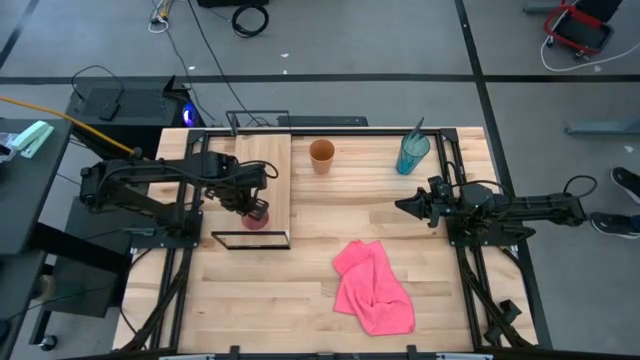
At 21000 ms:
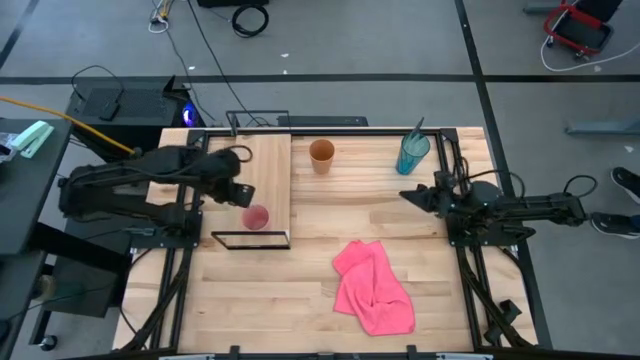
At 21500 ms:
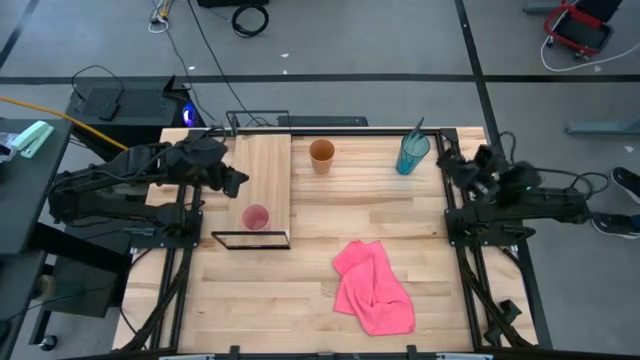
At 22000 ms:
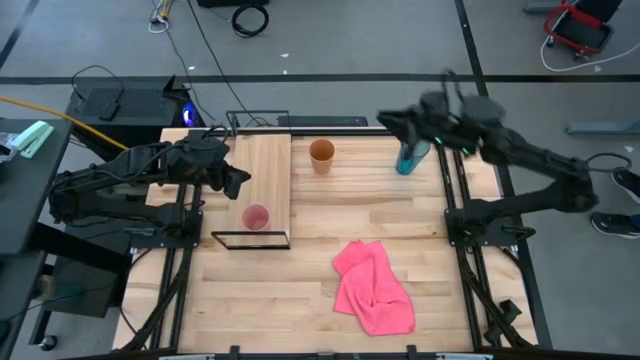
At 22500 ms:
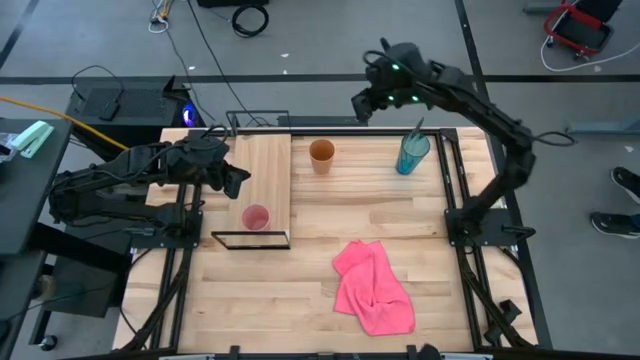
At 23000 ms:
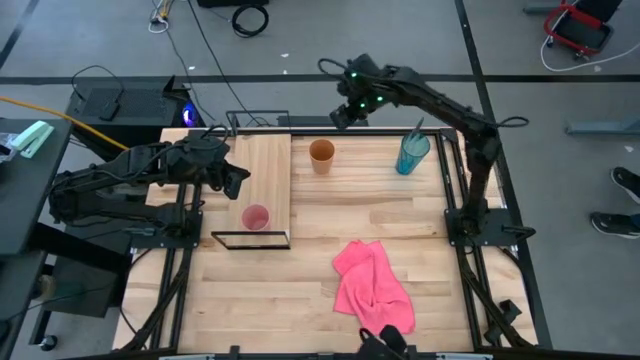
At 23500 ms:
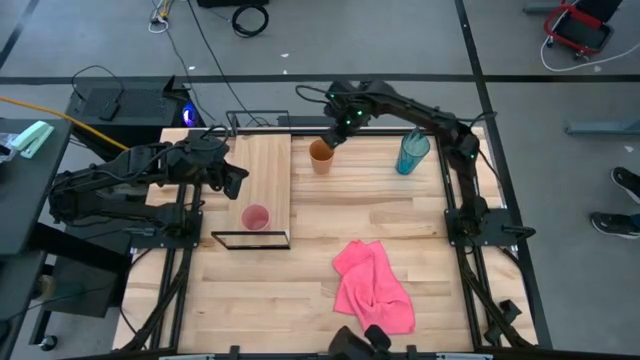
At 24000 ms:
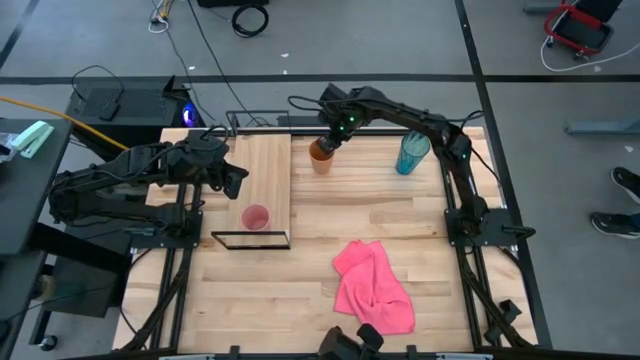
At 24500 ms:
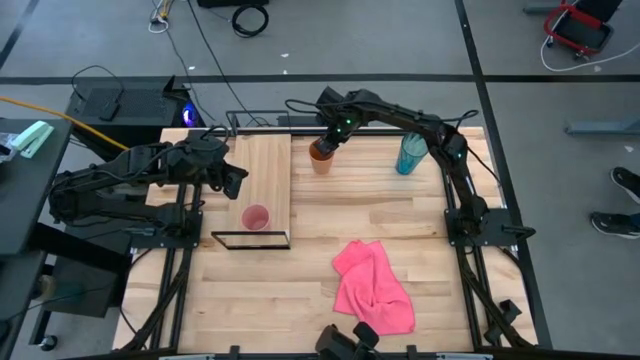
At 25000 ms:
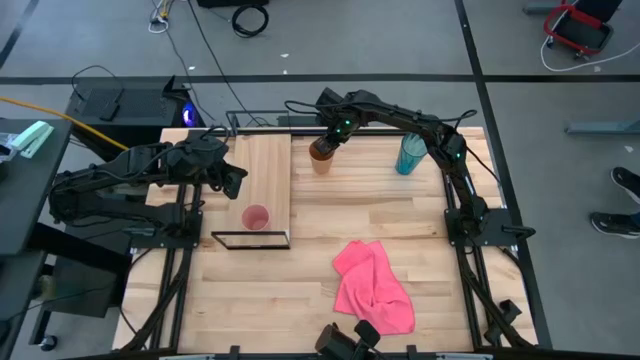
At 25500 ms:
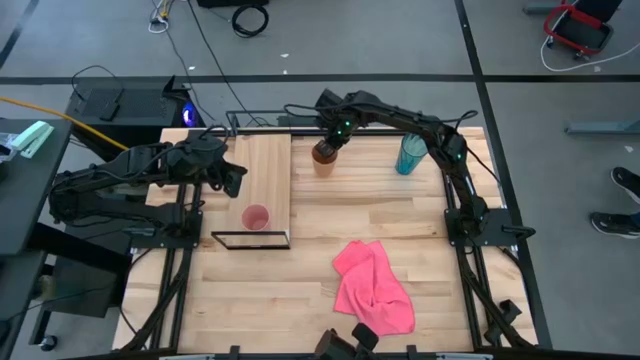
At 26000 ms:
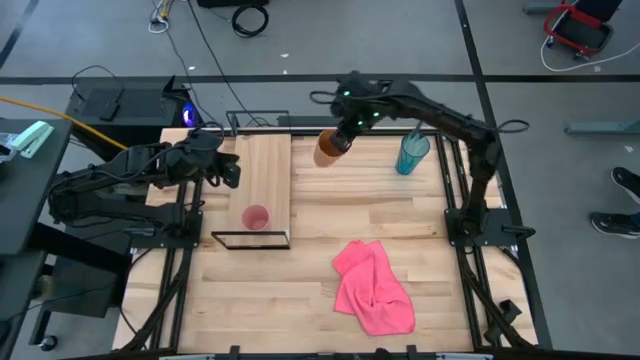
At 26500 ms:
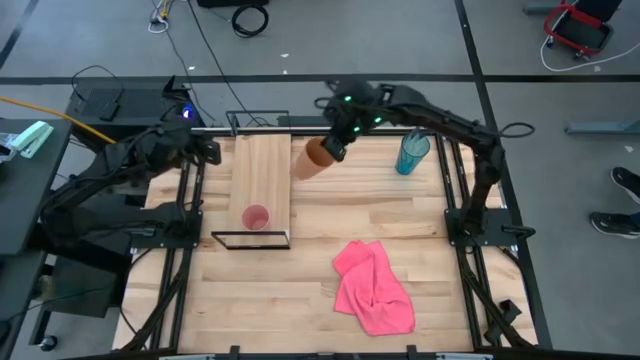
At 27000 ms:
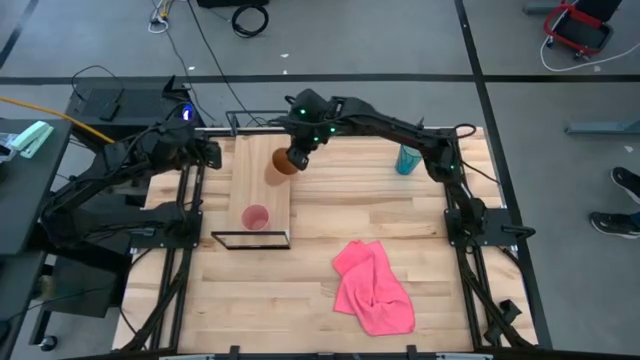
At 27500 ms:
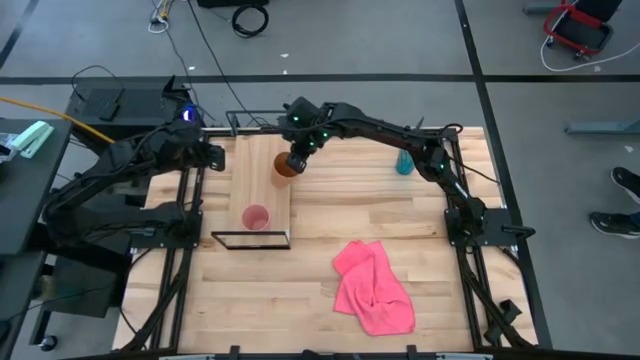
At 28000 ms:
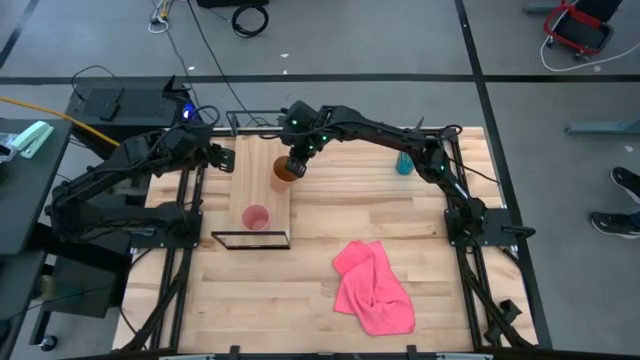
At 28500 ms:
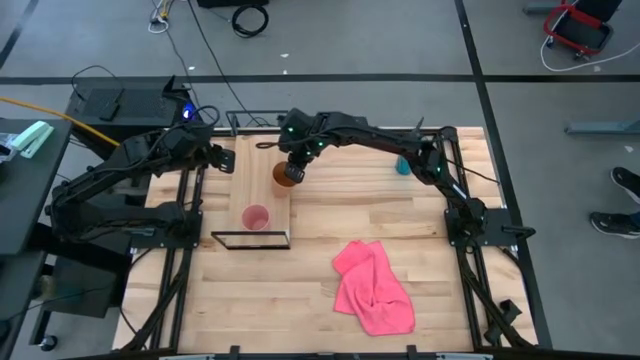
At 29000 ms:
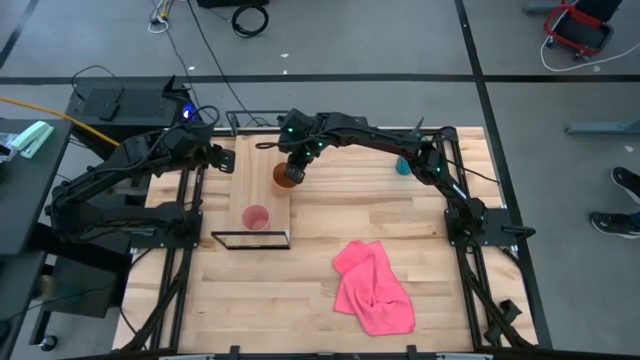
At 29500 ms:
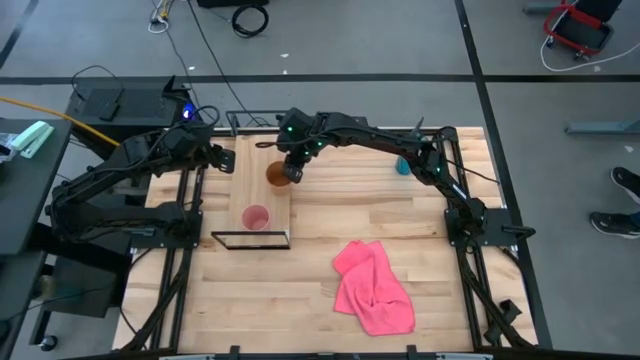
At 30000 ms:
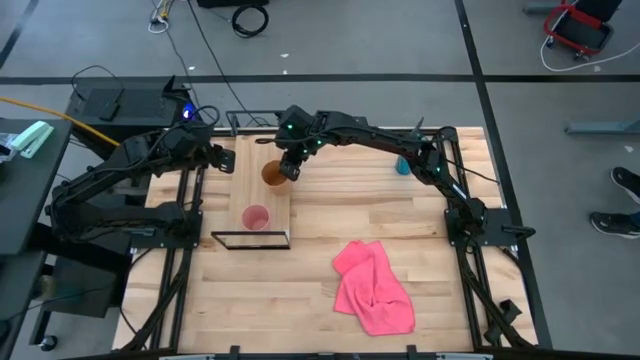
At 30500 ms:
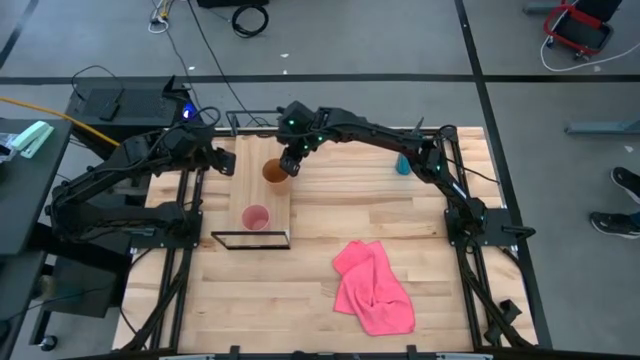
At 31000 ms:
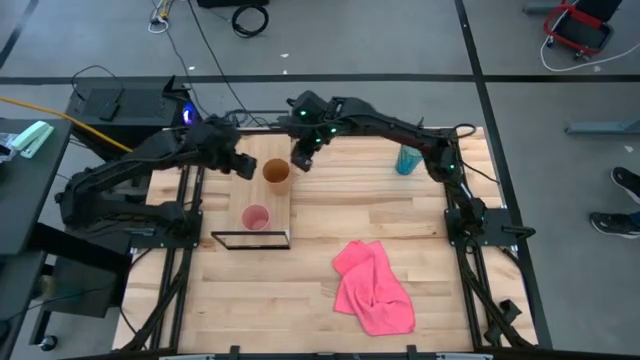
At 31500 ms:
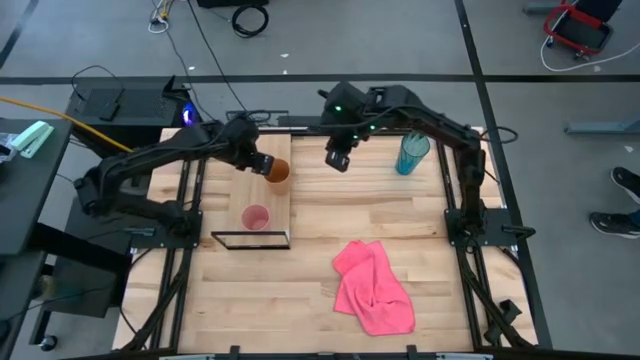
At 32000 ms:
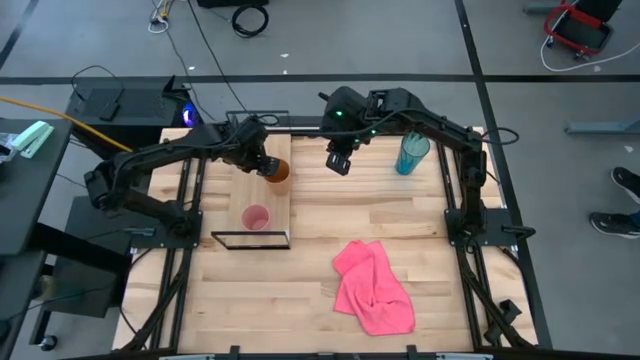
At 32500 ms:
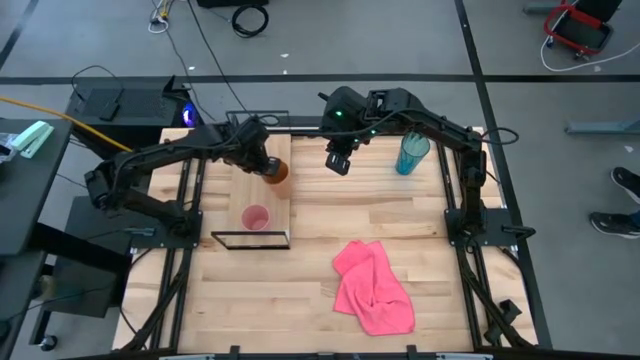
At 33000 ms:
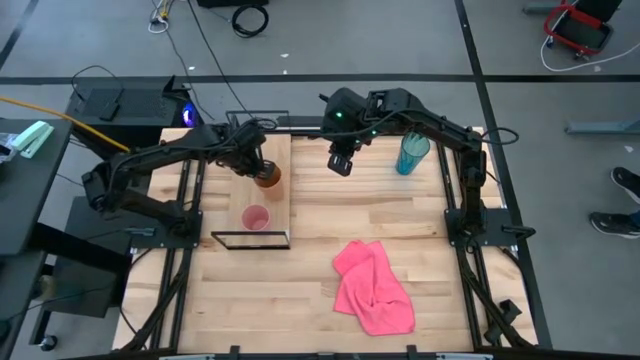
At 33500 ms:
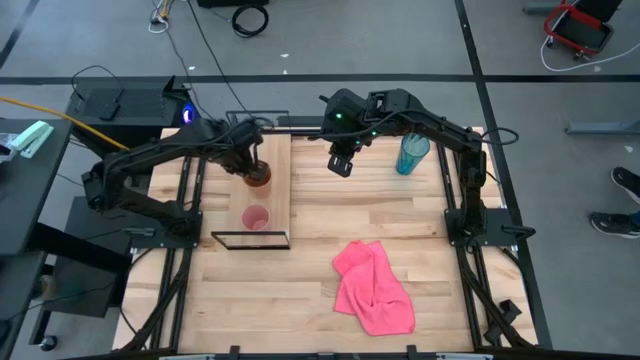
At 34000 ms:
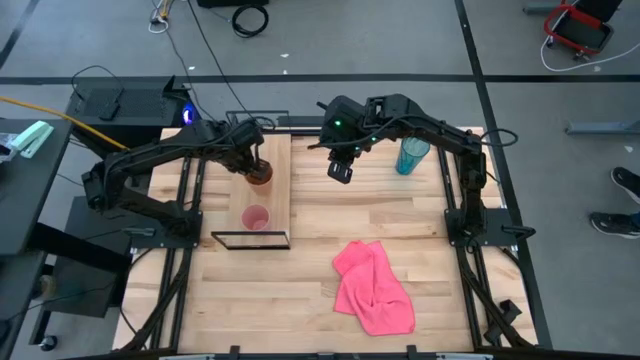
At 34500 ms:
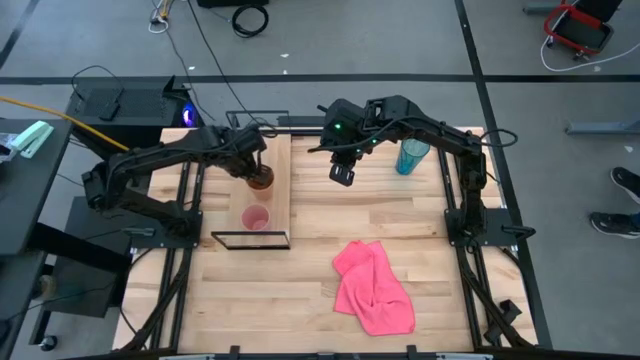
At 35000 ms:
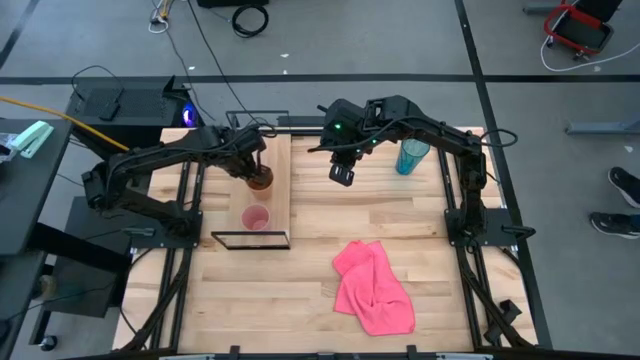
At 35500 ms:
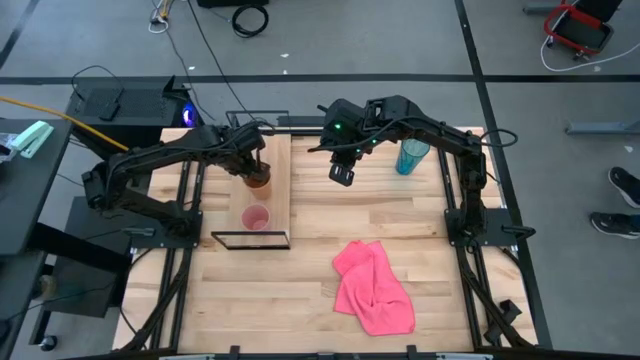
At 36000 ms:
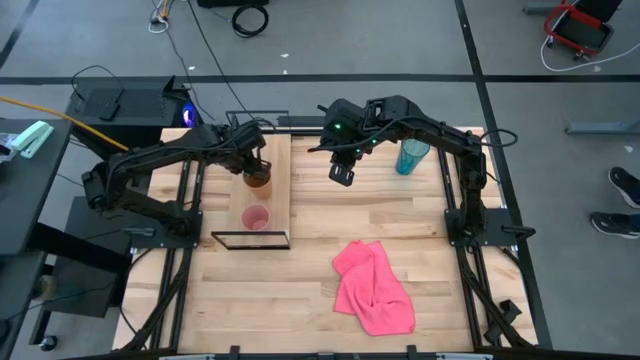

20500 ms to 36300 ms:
Task: Stack small to large cups/mugs on shelf
Put the orange cup on the shelf

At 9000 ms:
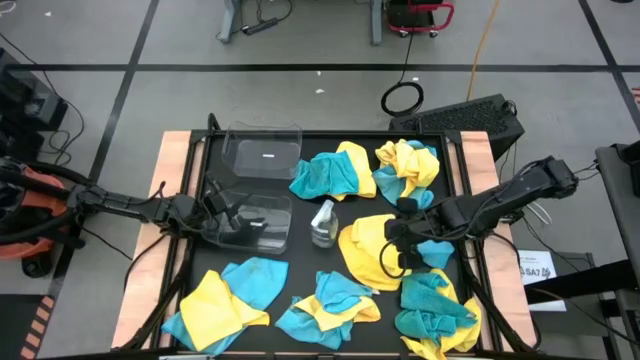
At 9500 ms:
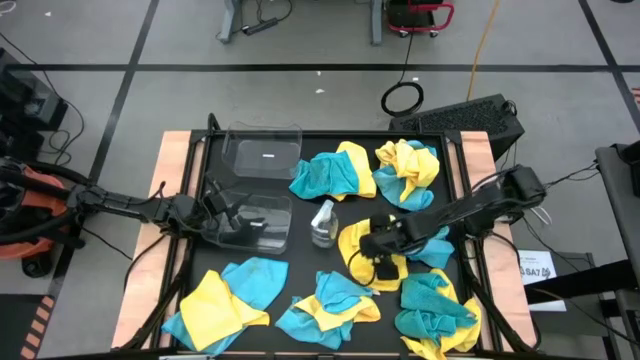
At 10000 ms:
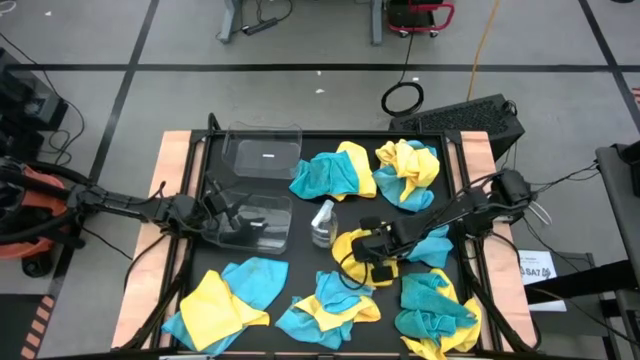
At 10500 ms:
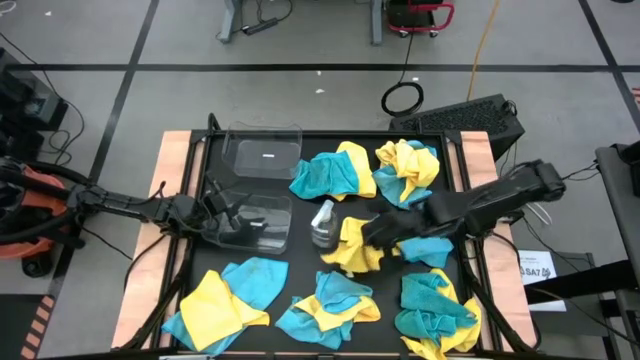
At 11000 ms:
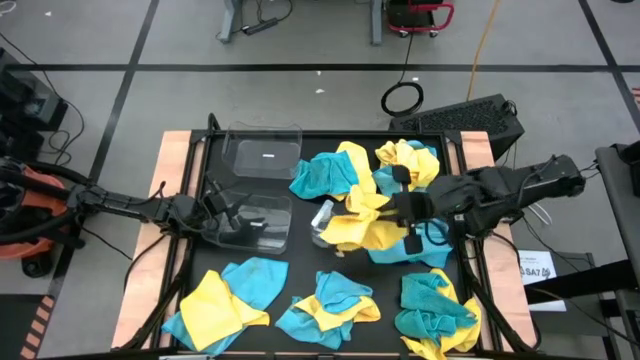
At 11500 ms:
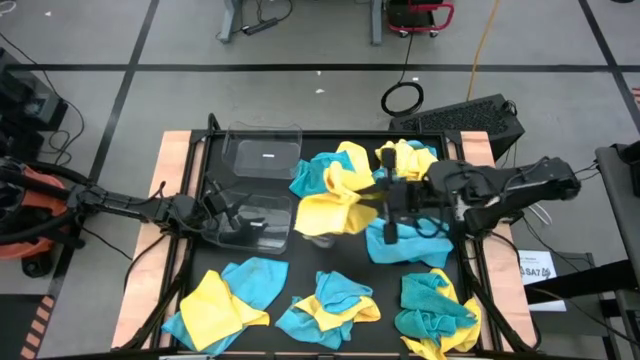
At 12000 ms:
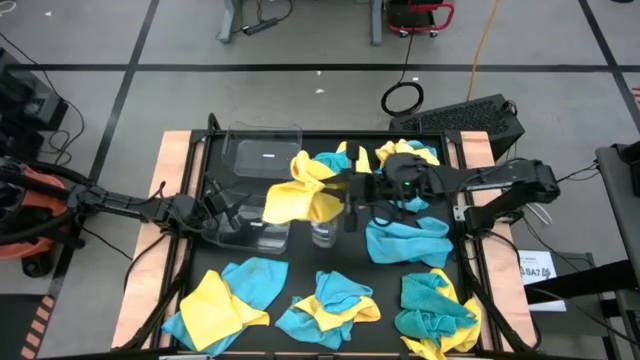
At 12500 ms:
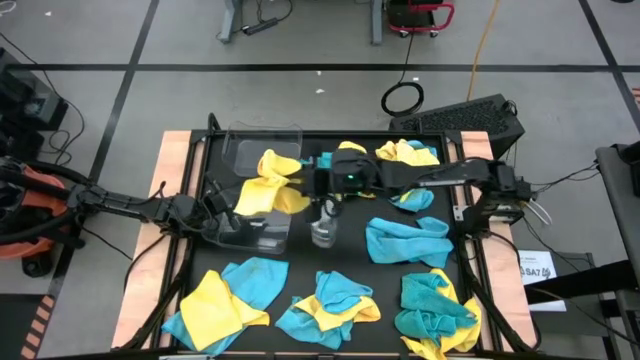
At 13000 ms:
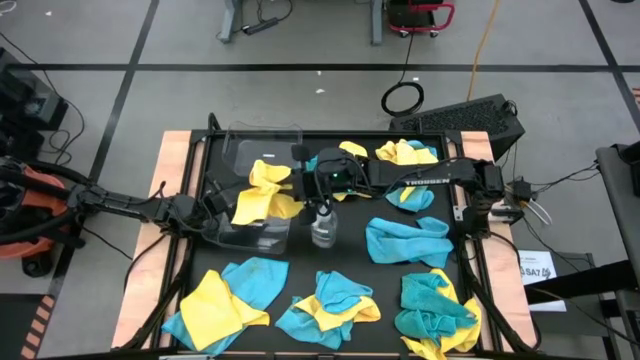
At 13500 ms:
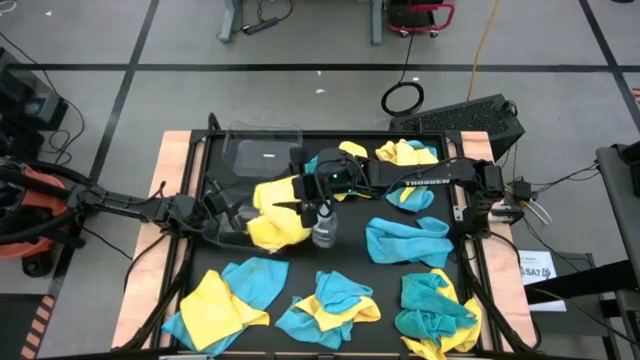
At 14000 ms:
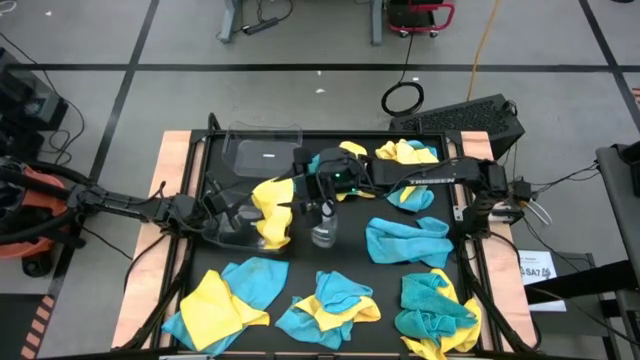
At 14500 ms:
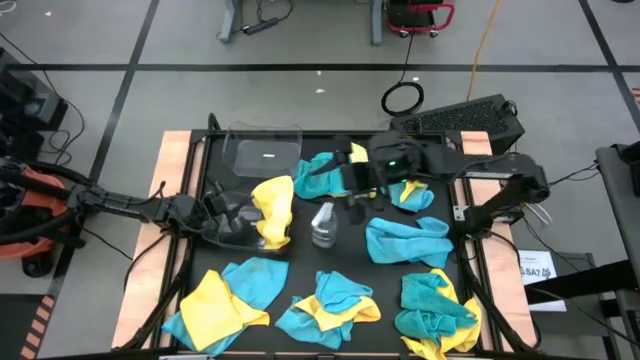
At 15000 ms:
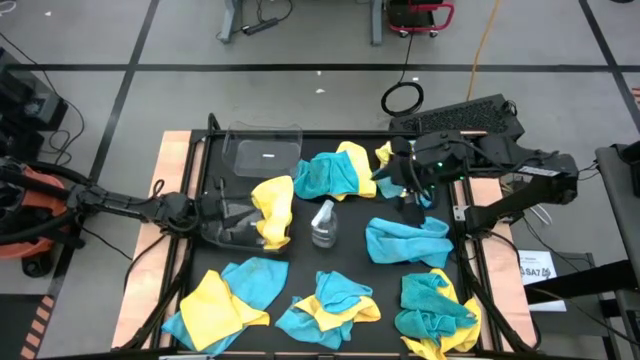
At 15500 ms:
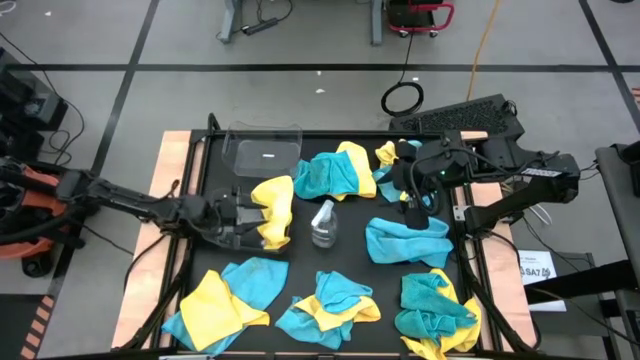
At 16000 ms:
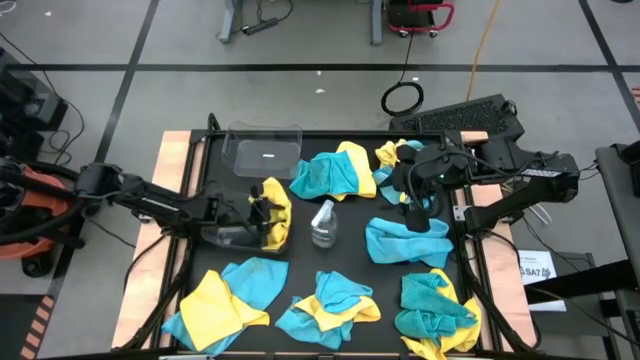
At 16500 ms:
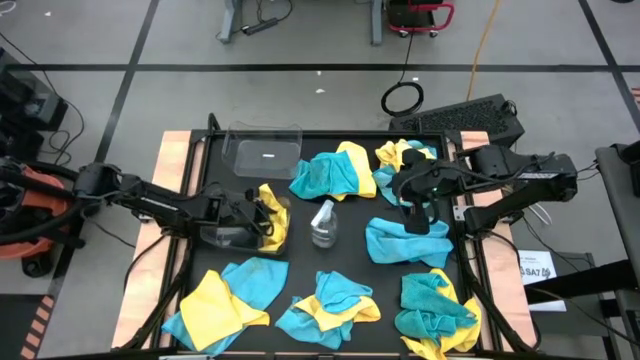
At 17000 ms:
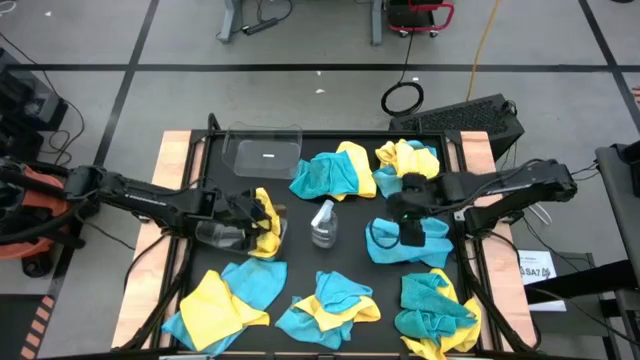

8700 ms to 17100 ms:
Task: Sort microfiber towel by color & place in baskets
Put the yellow microfiber cloth into the bottom transparent bin
